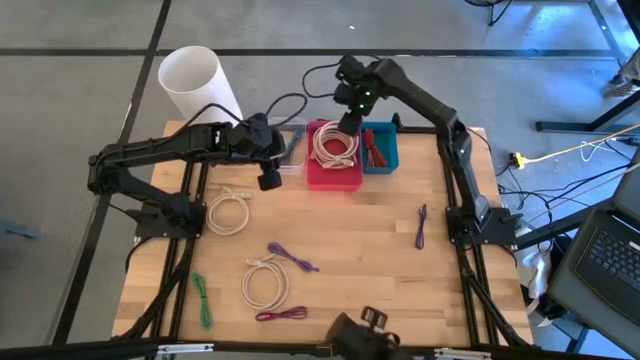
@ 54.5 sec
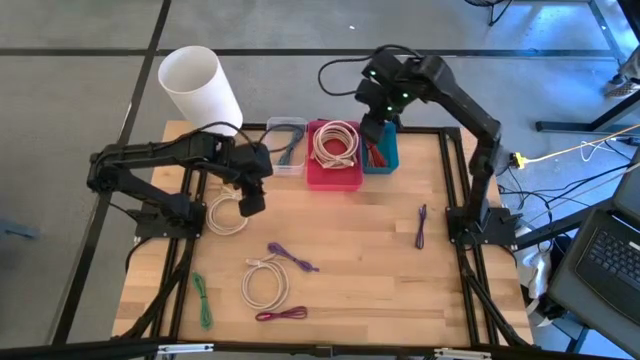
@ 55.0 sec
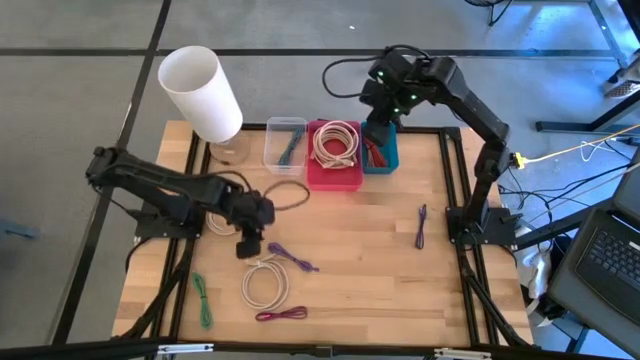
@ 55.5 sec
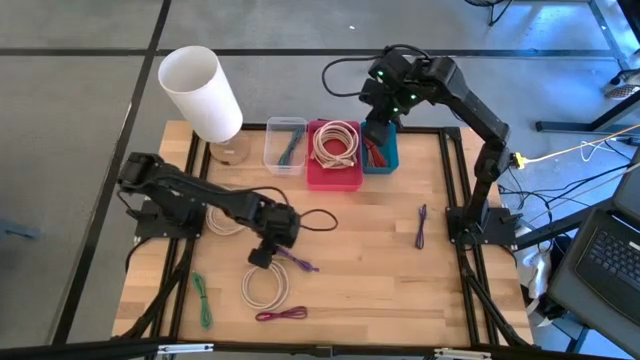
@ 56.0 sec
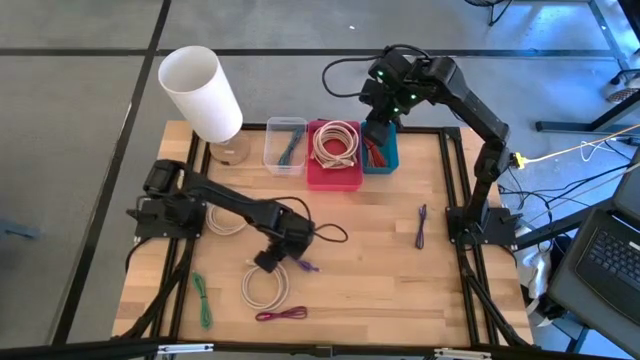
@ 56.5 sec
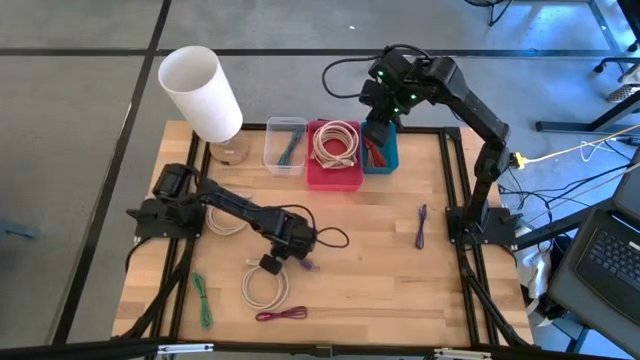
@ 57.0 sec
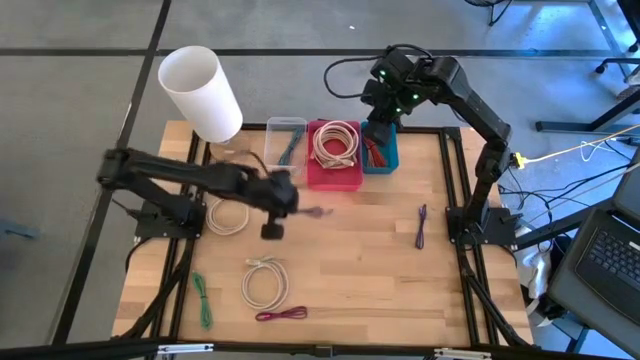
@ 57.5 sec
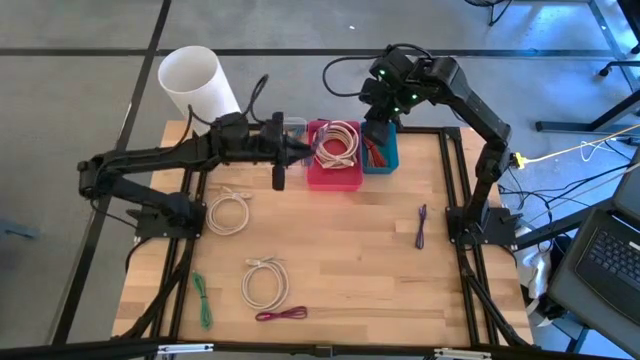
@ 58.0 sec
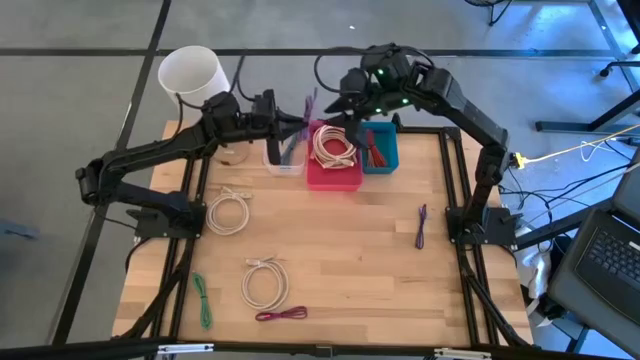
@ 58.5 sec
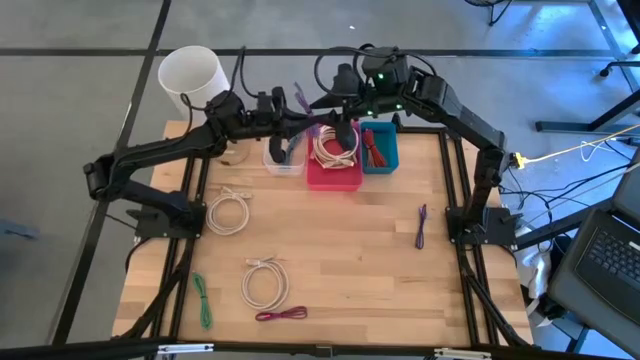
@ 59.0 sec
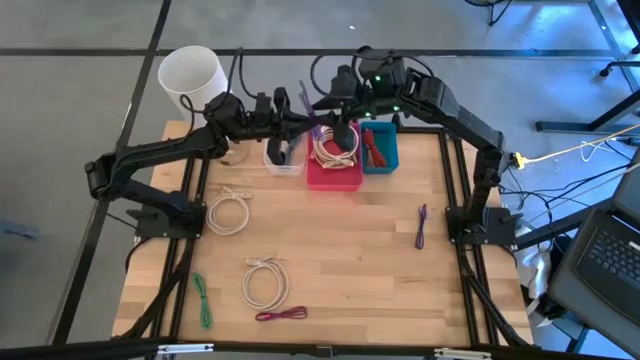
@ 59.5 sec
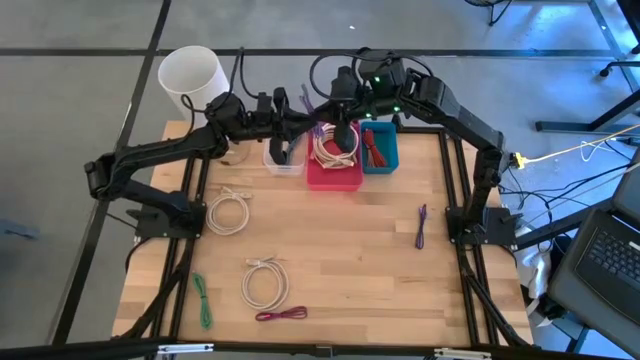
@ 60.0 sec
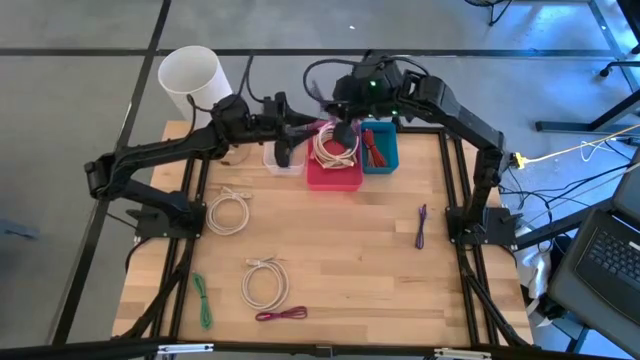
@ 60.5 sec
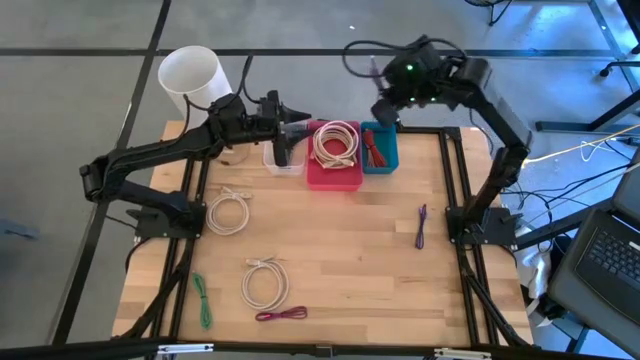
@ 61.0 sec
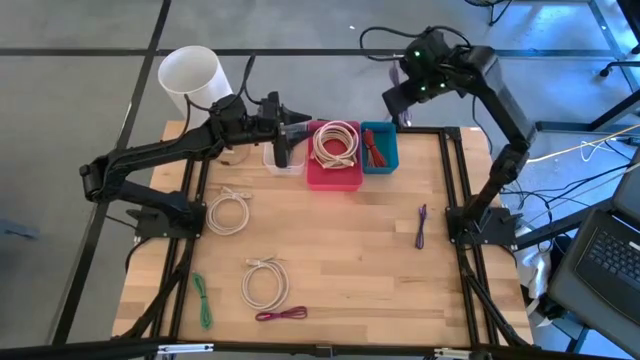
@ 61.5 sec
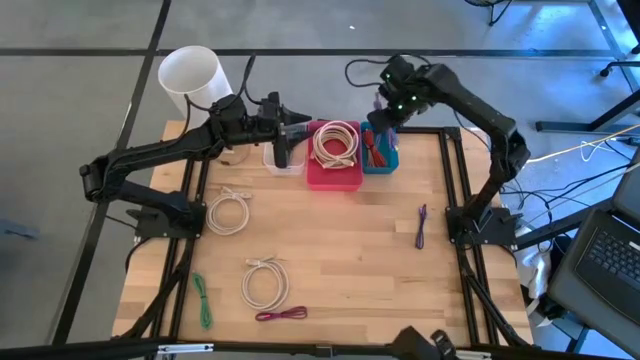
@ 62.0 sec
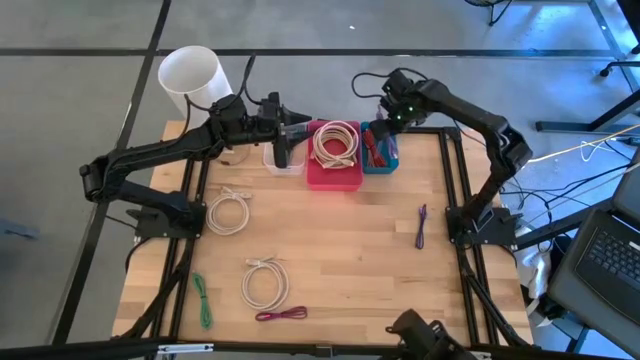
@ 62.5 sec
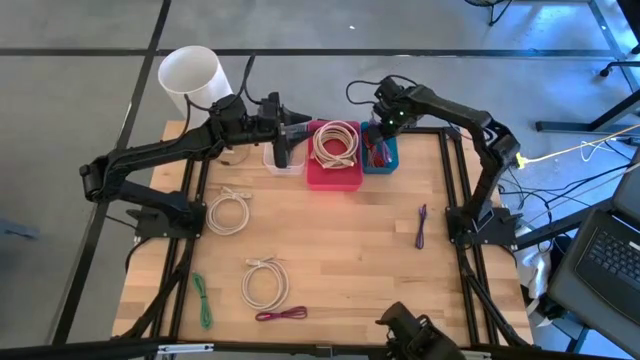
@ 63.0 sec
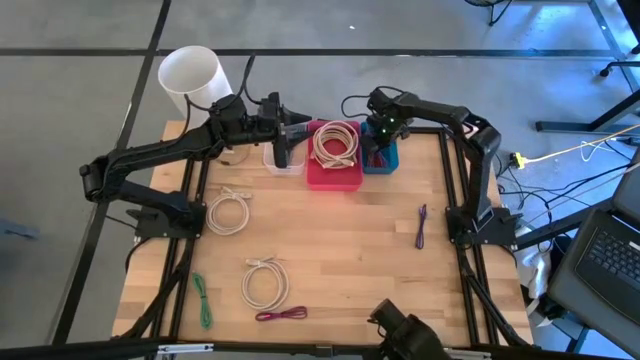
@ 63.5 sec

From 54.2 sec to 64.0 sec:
Task: Pick & Place USB Port
Put the purple charger cable into the blue bin

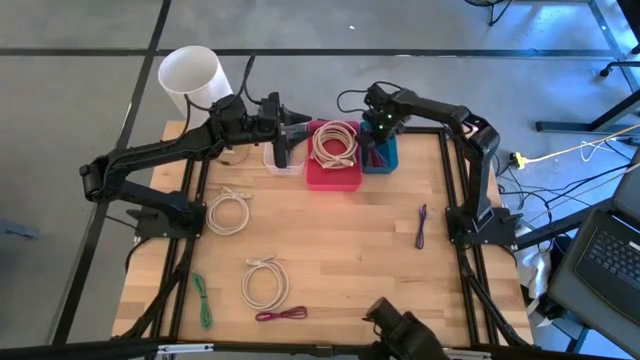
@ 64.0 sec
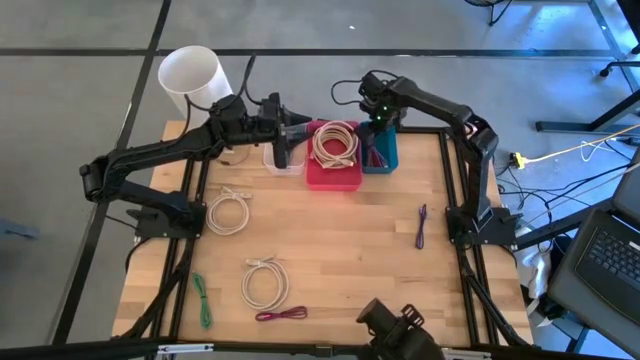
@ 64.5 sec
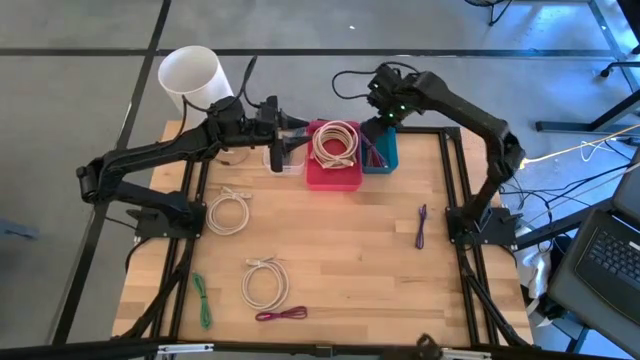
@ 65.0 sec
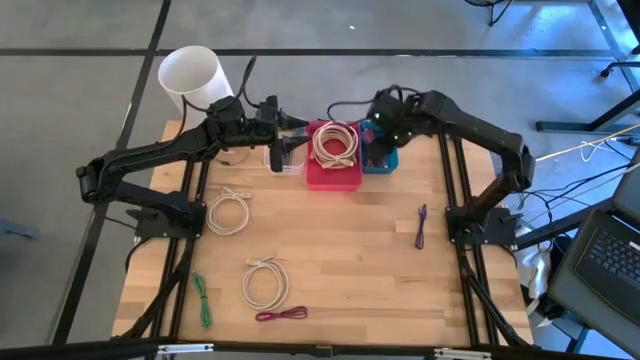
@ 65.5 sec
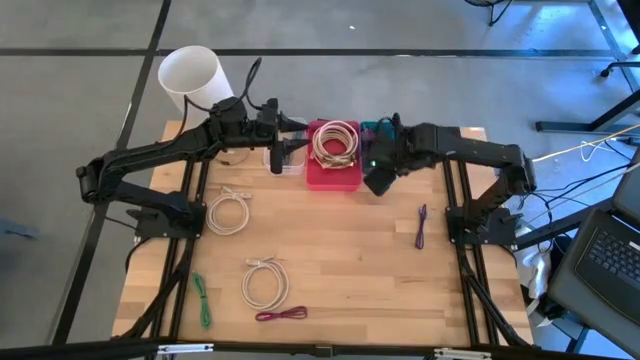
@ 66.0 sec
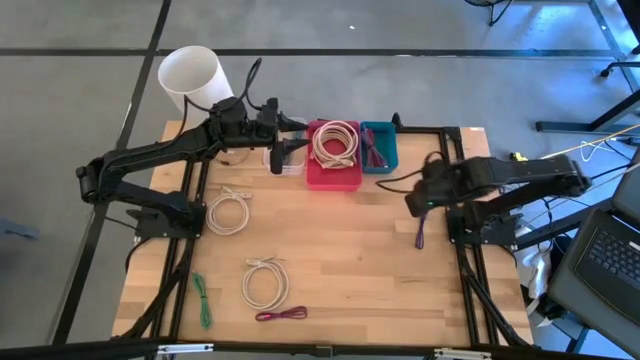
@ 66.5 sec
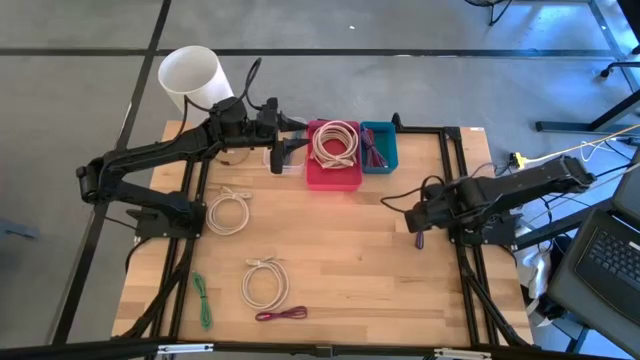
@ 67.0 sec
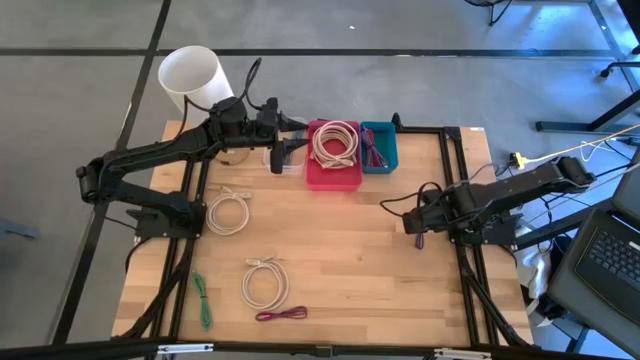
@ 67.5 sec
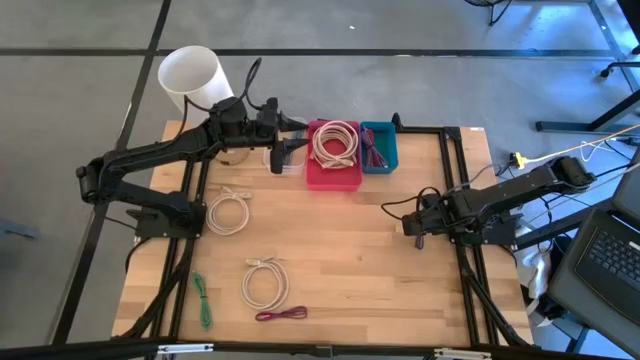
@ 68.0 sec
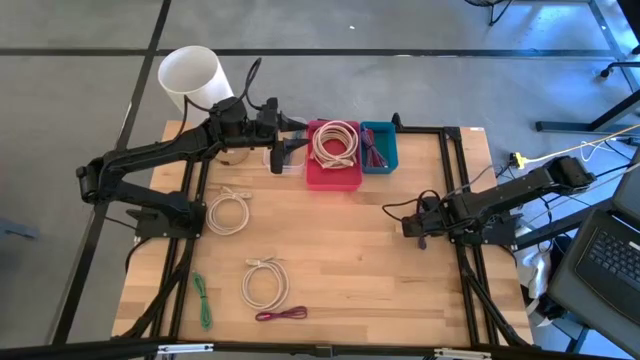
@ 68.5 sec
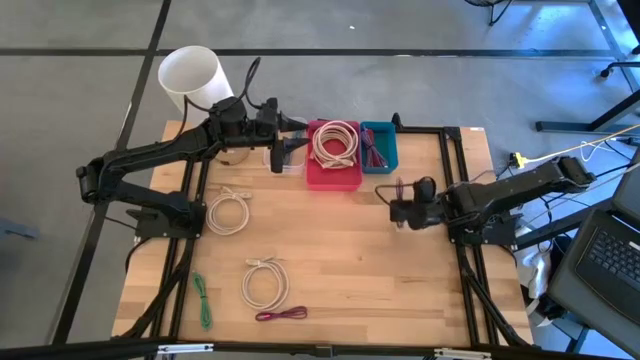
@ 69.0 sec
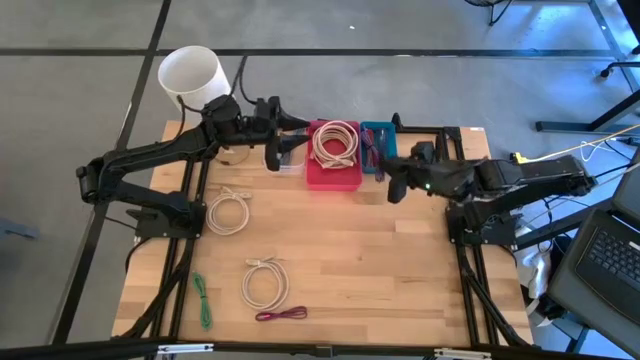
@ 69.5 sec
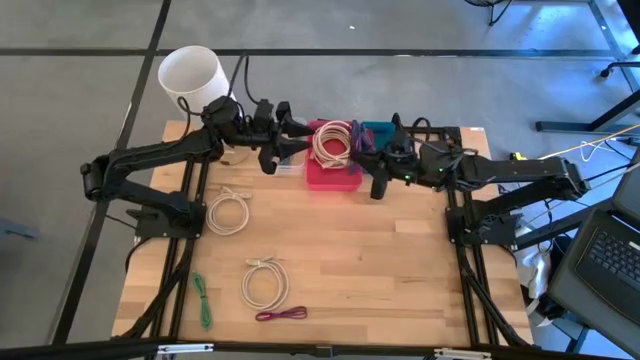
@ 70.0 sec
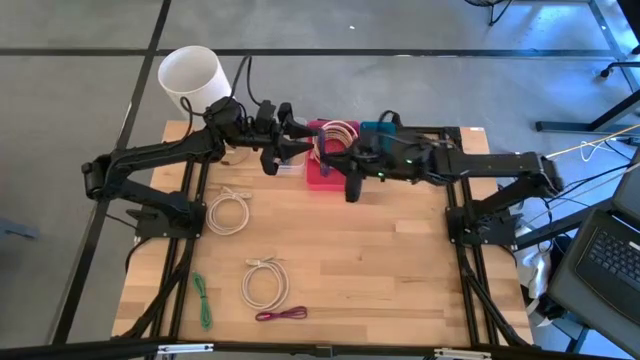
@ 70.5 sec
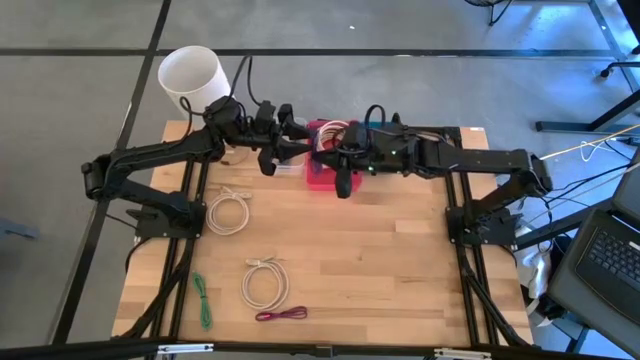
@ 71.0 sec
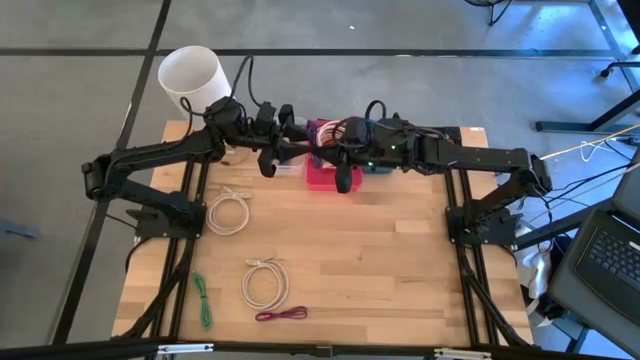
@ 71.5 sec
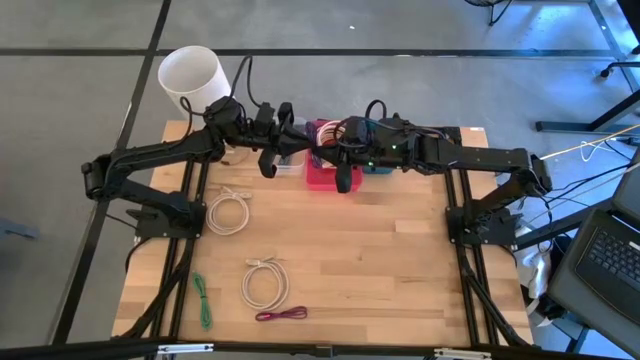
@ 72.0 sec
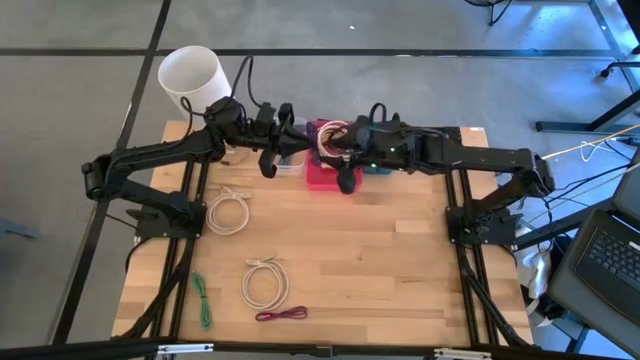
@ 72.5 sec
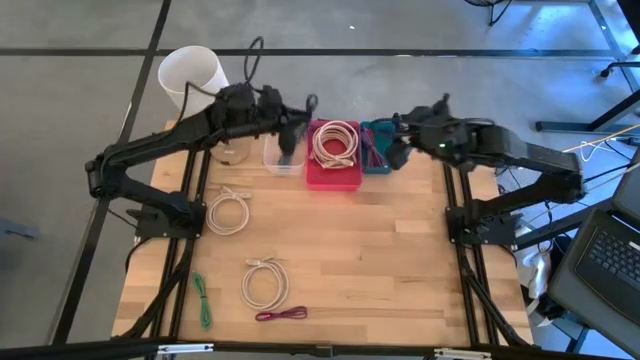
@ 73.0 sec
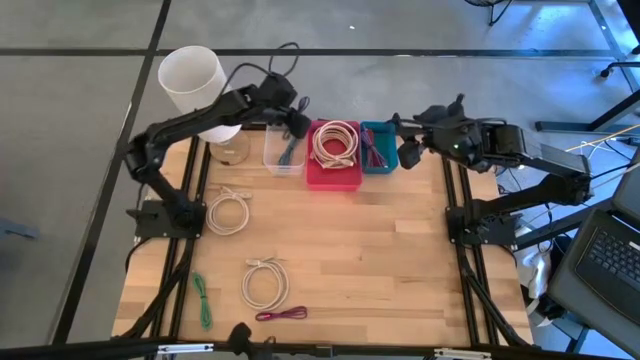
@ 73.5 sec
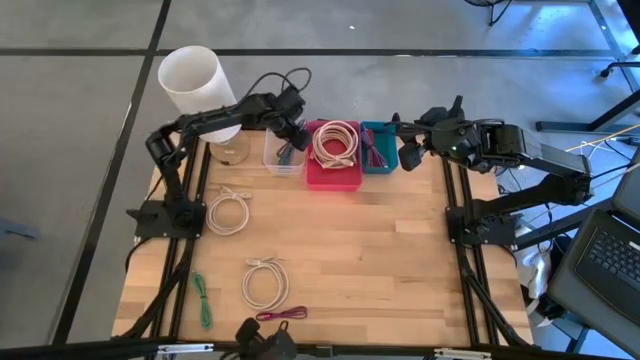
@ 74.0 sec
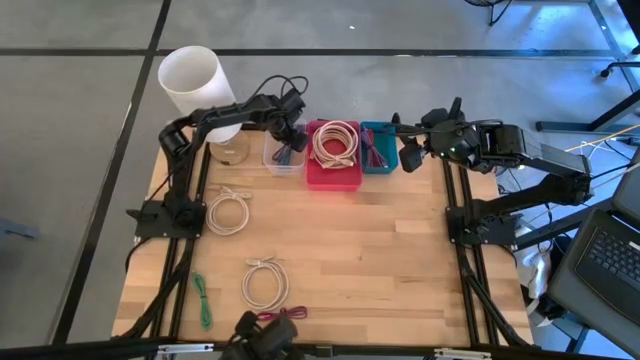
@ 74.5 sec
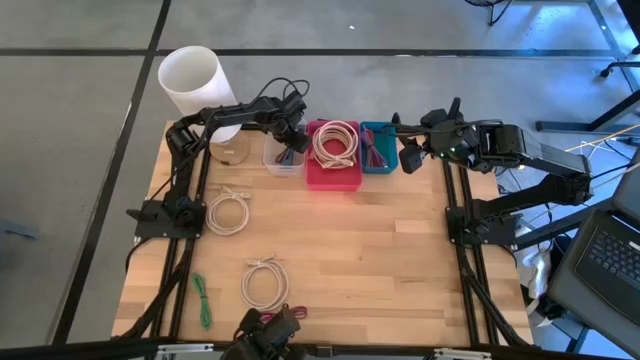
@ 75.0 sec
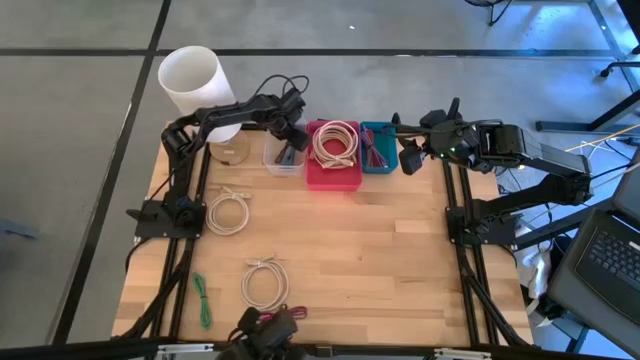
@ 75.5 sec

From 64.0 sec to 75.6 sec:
Put the violet and black charger cable into the white bin
